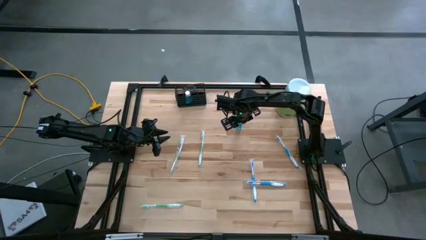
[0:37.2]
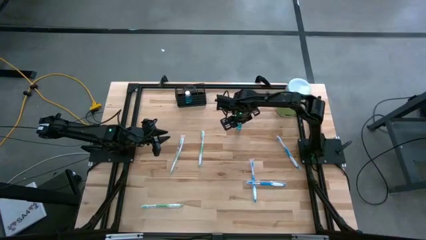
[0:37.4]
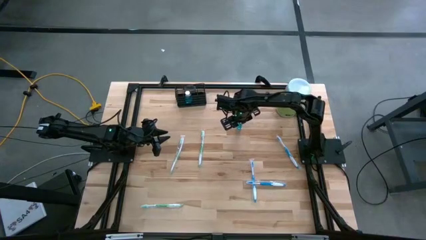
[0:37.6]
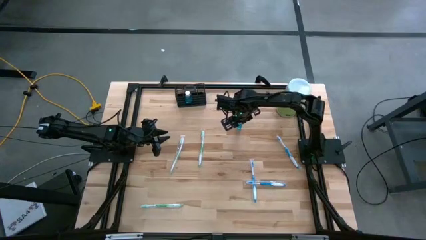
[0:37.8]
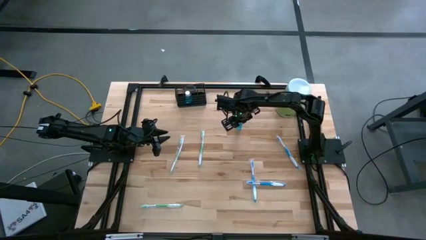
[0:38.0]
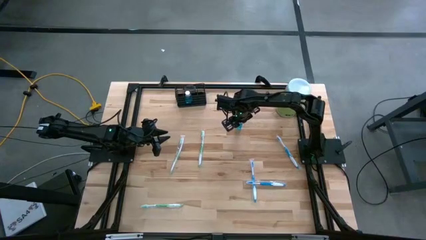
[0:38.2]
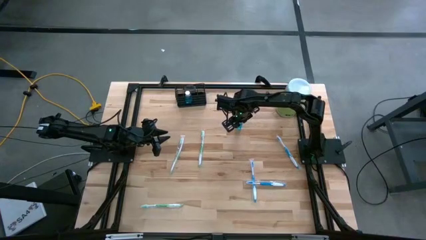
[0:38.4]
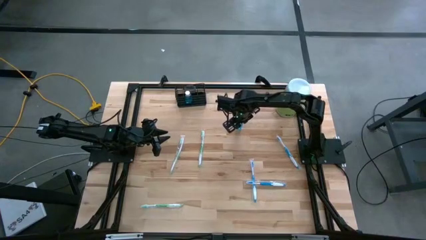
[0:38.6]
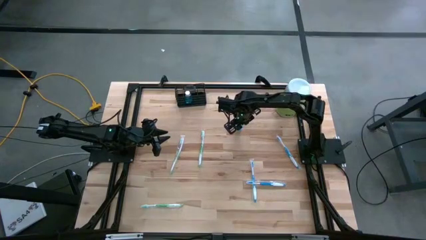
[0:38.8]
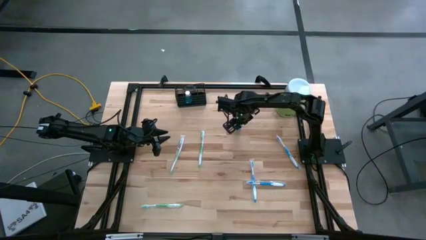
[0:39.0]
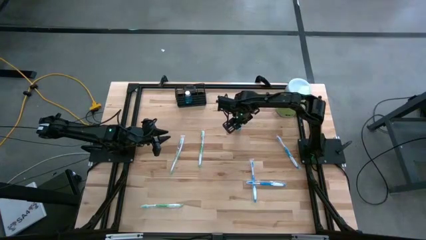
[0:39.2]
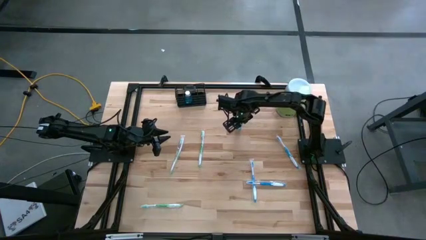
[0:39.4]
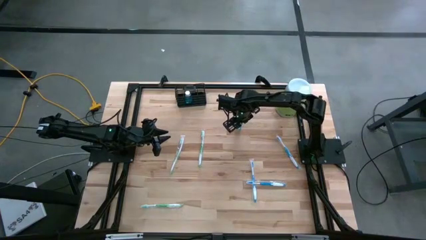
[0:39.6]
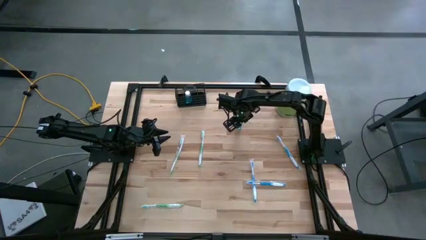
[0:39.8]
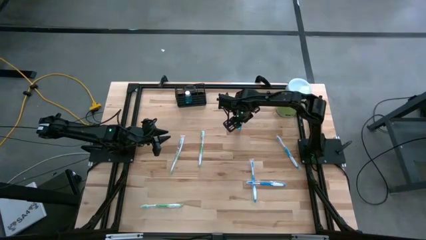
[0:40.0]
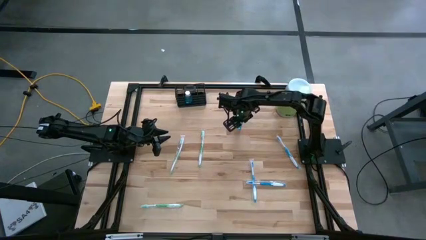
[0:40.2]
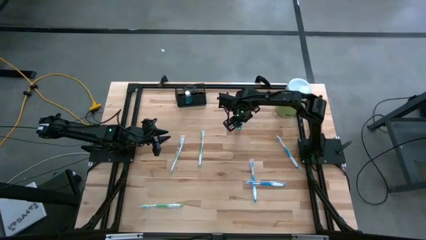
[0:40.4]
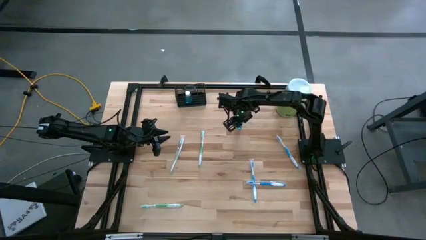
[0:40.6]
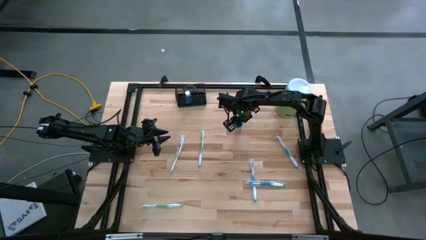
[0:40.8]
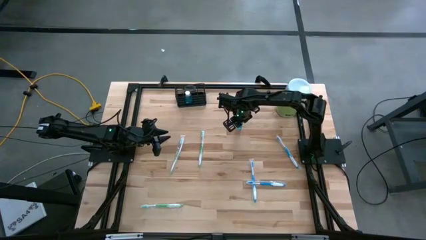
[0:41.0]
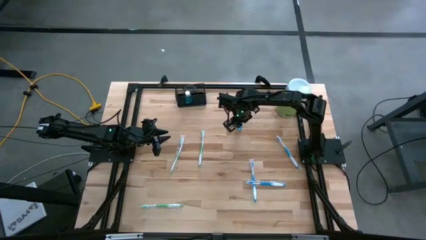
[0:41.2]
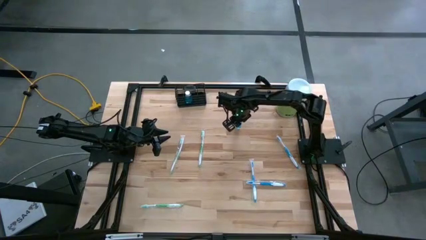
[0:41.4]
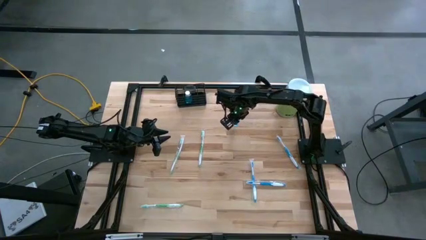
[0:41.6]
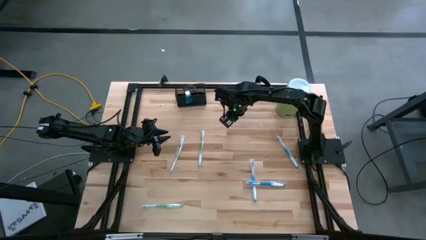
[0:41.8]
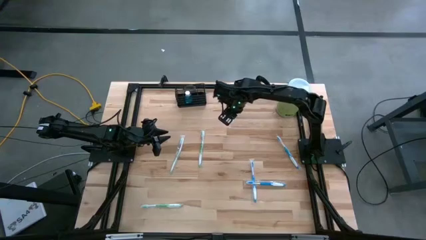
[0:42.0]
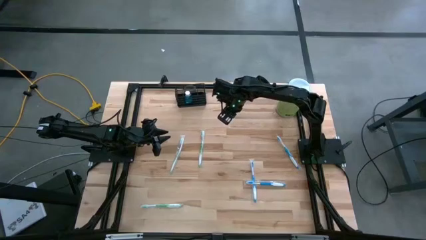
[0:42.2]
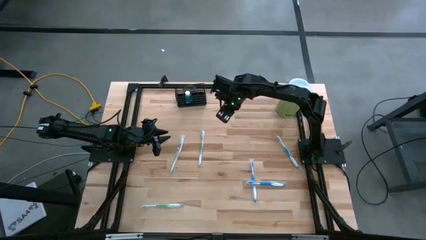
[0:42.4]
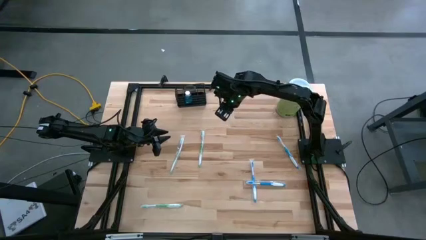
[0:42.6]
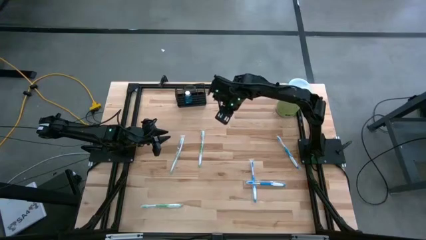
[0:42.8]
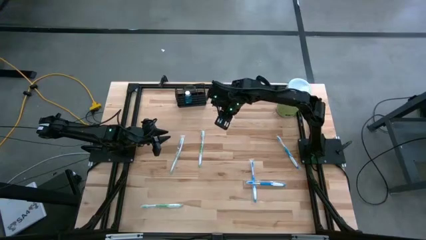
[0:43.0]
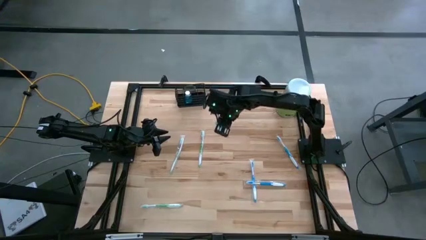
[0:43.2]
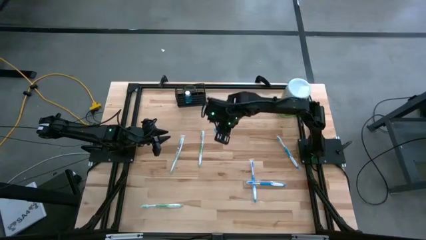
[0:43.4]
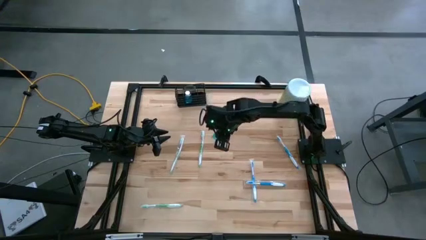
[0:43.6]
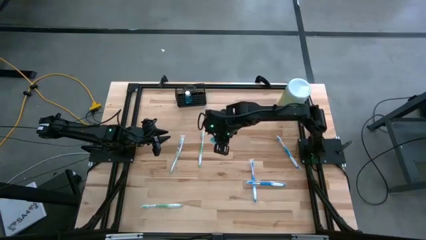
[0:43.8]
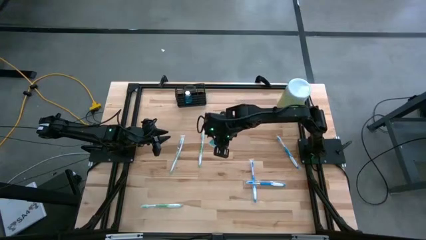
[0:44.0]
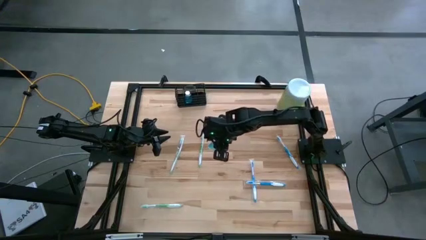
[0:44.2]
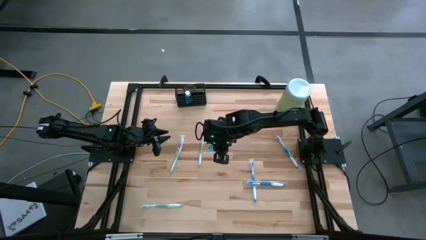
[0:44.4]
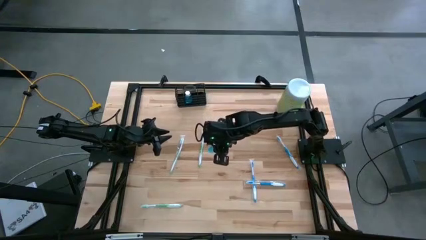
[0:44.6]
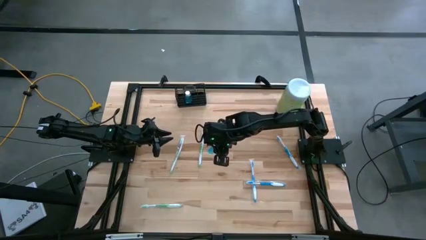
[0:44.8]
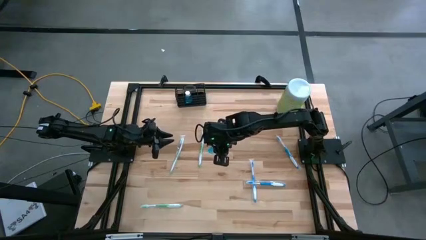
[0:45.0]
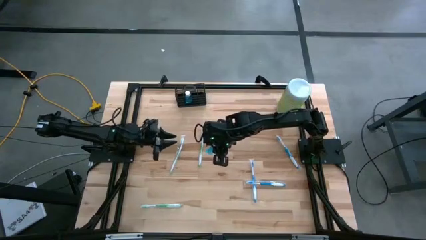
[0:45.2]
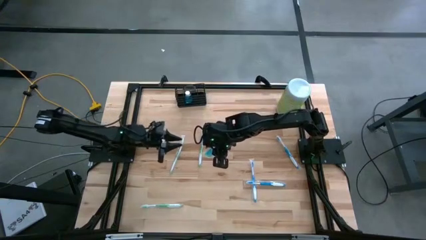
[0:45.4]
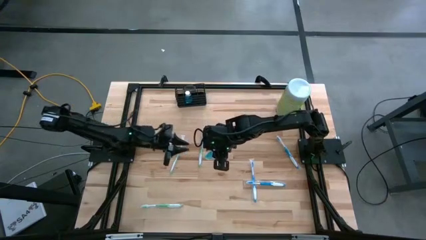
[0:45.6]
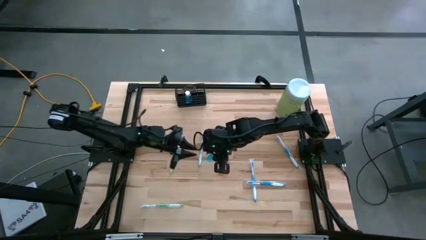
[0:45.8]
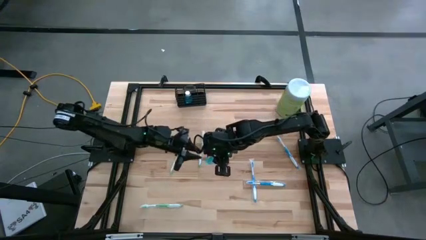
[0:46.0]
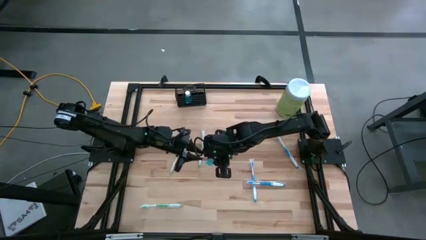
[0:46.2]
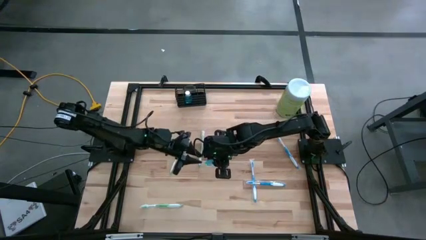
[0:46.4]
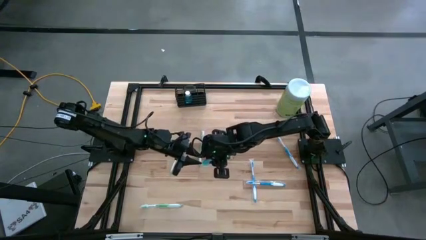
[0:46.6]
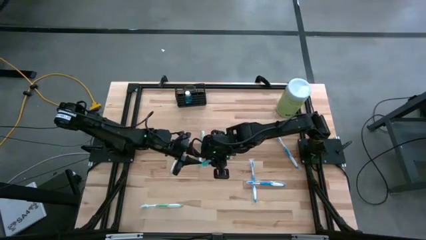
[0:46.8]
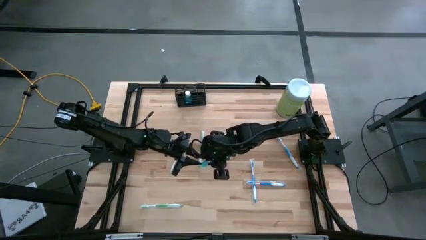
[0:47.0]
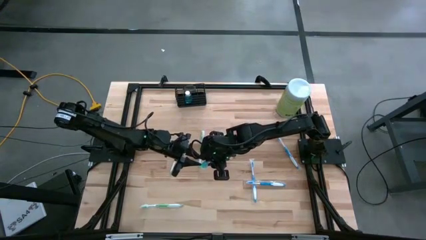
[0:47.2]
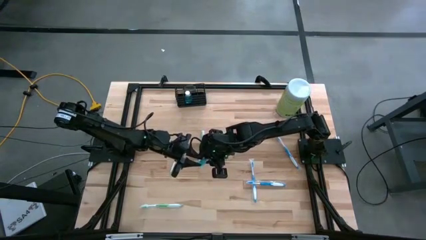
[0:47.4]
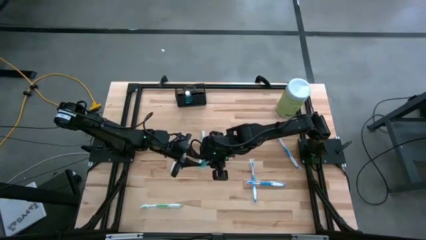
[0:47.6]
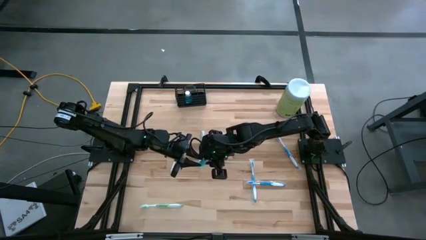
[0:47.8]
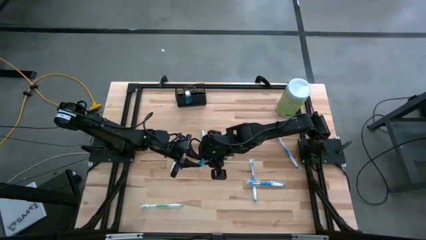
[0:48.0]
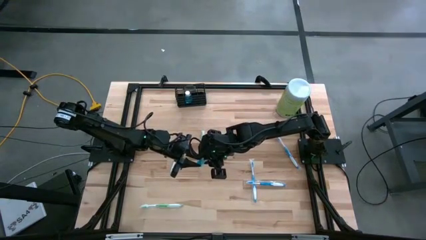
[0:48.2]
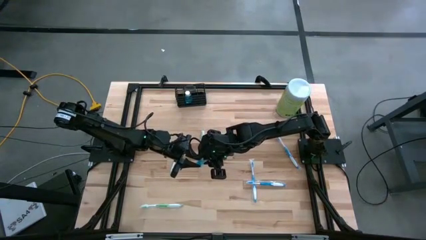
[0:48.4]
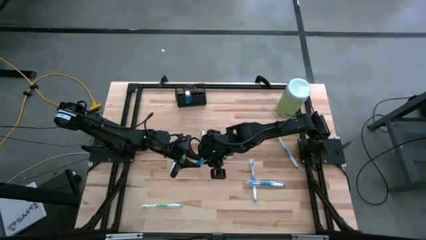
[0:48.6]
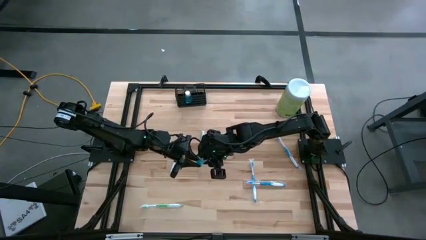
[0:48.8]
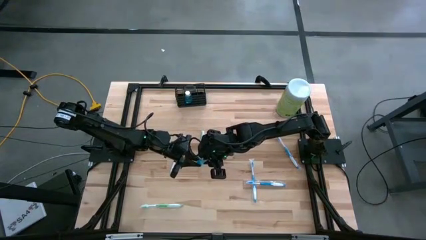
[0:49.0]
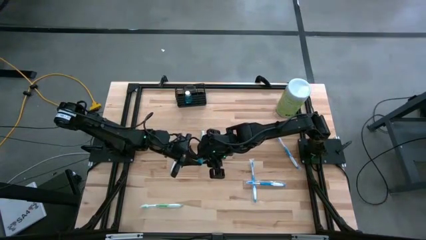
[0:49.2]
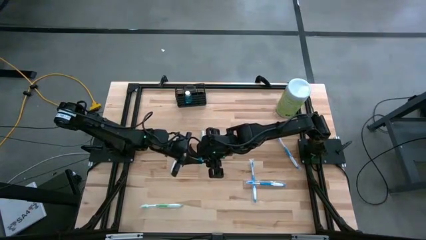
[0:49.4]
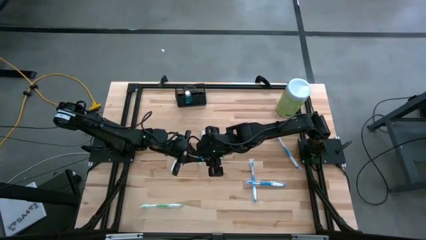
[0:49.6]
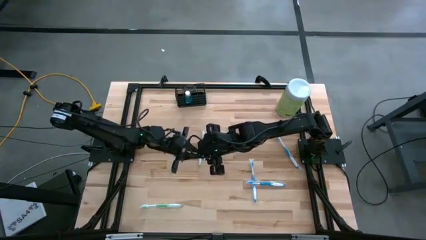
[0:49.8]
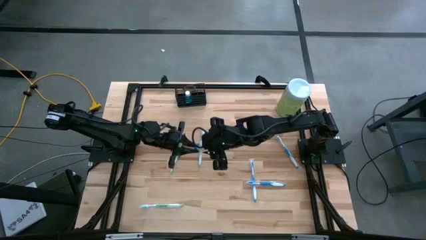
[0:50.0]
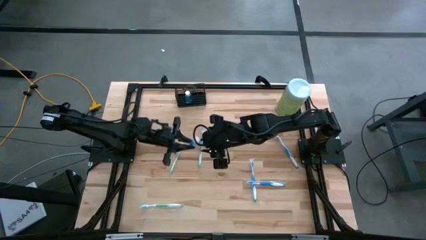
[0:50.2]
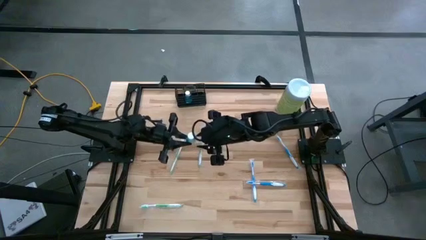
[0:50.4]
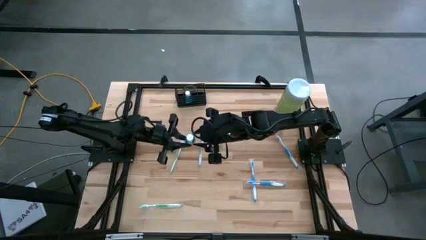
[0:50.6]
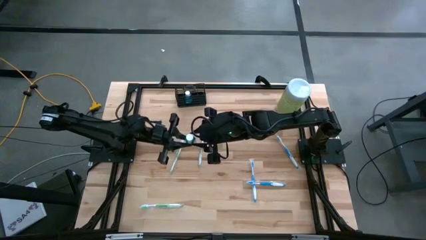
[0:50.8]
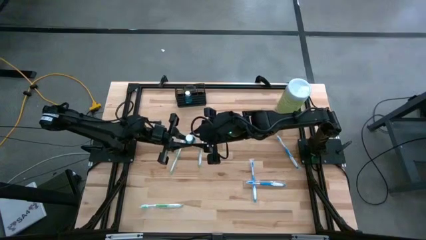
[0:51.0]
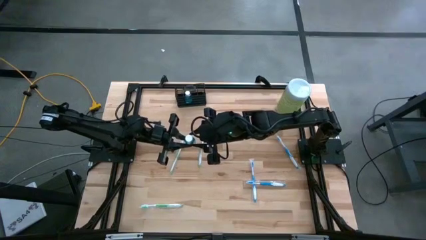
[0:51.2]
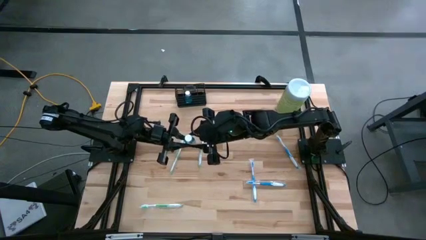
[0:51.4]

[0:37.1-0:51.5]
Task: Pick & Place toothbrushing station
Put the blue mouthwash bottle into the wire organizer
